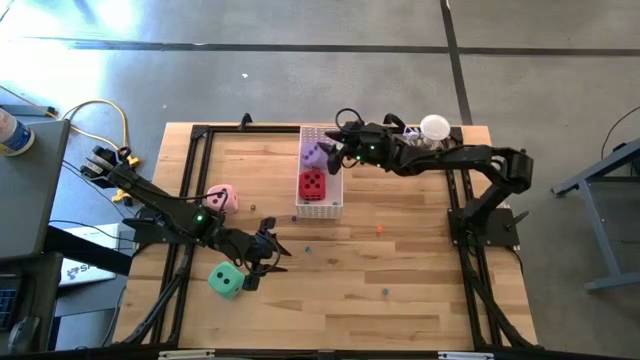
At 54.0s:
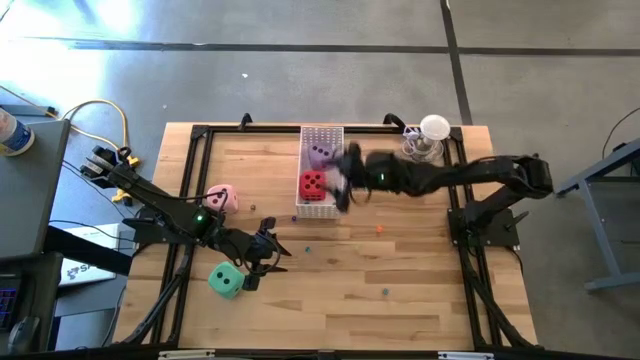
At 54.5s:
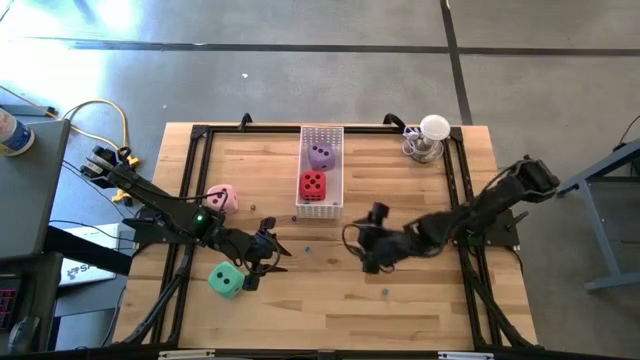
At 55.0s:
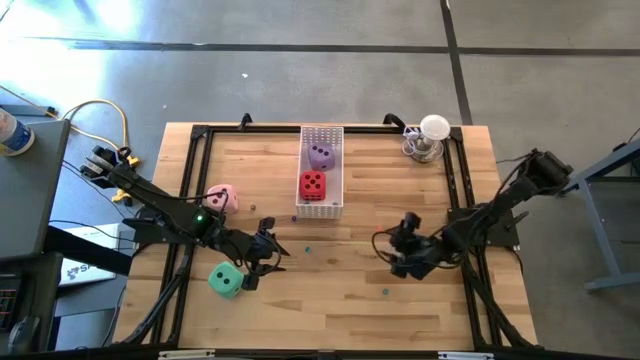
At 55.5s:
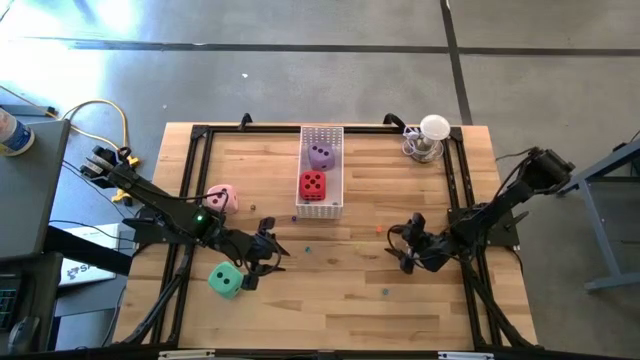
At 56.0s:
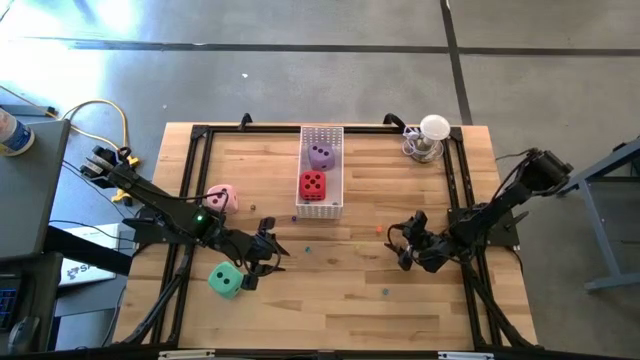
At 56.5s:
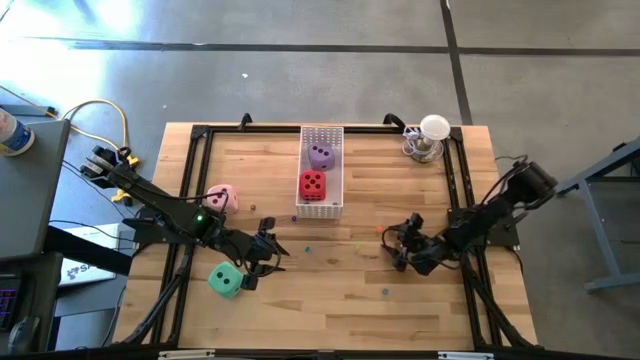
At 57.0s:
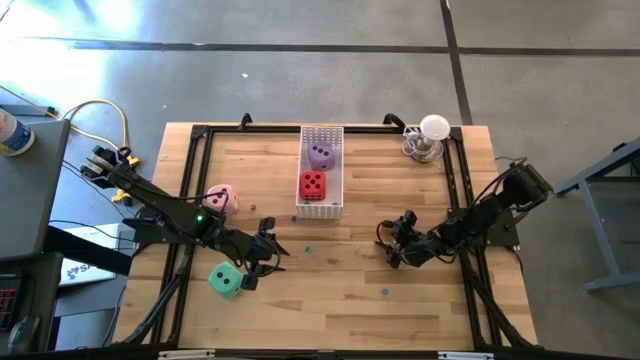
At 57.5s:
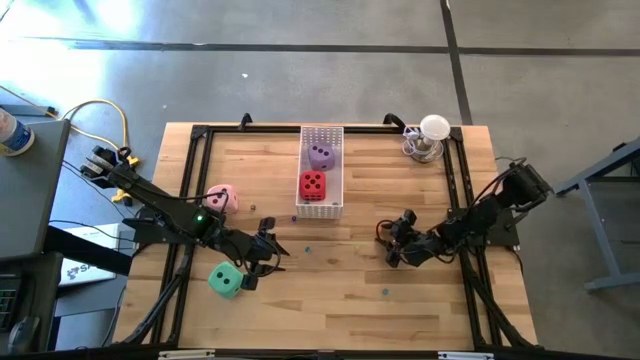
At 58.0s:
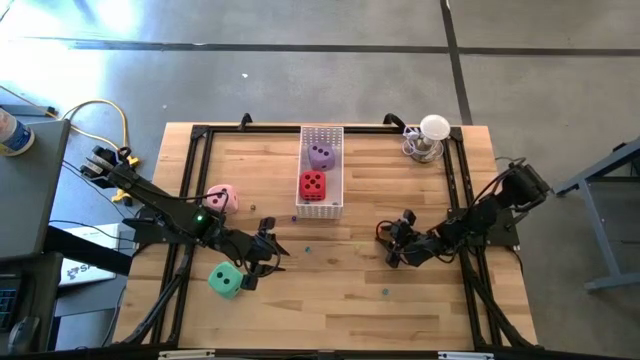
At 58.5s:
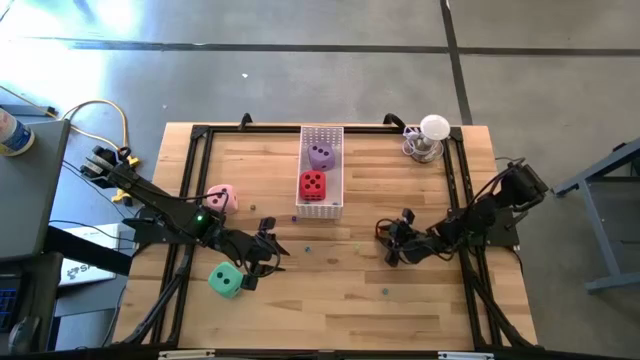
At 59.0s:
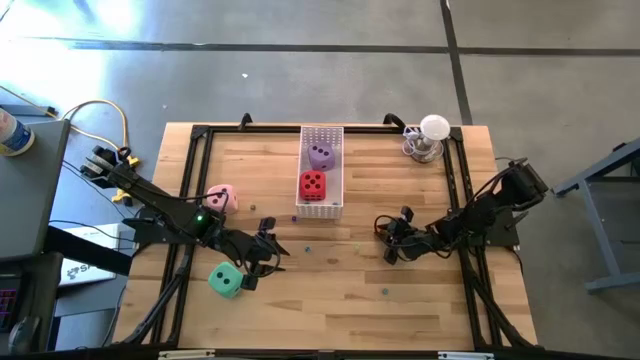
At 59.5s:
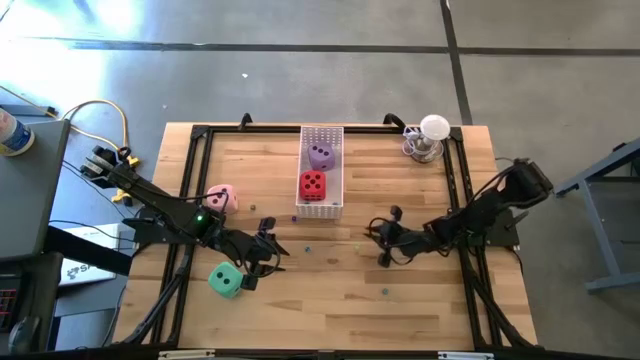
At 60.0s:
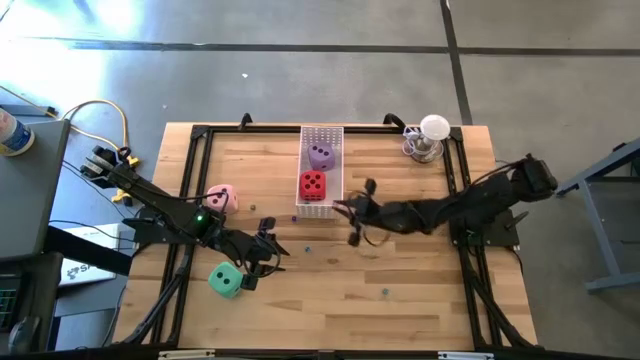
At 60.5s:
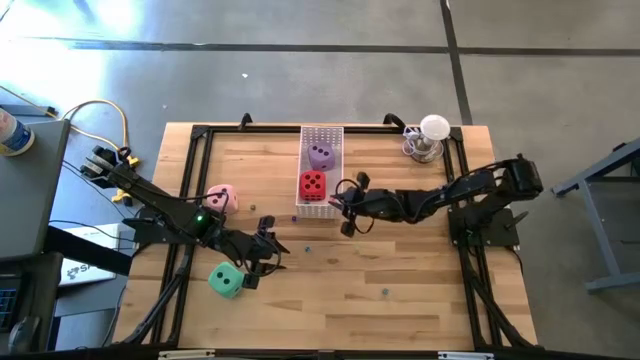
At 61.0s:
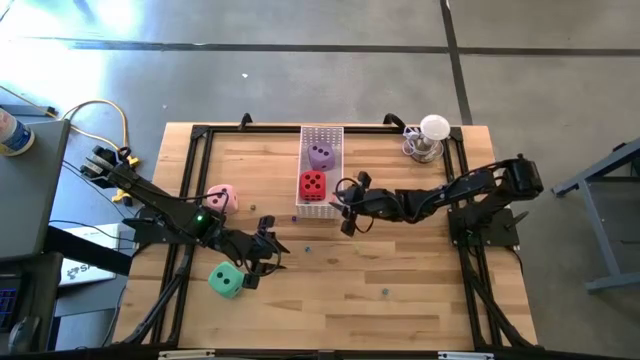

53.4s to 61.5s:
Task: Pick & Place Dice
Put the small orange die into the bin

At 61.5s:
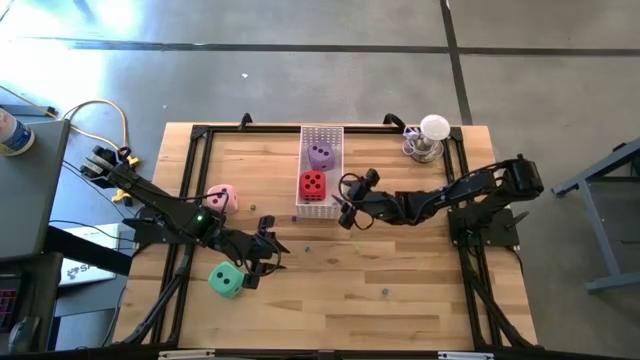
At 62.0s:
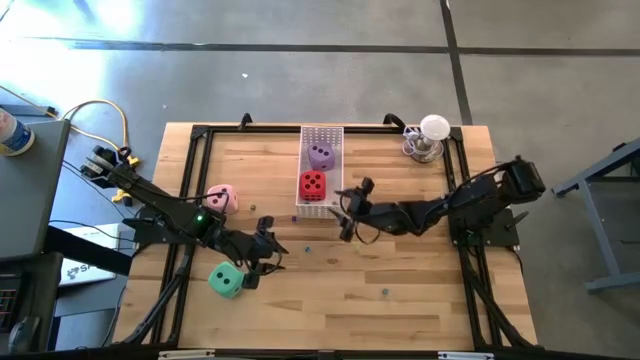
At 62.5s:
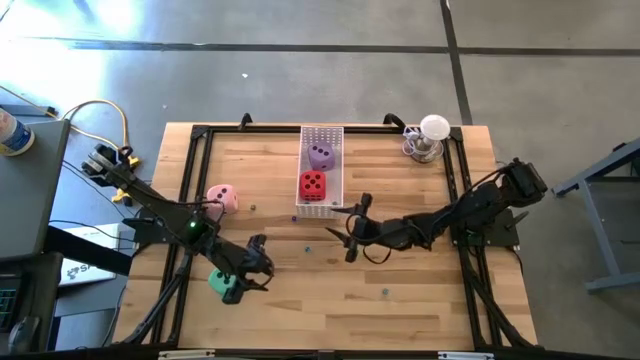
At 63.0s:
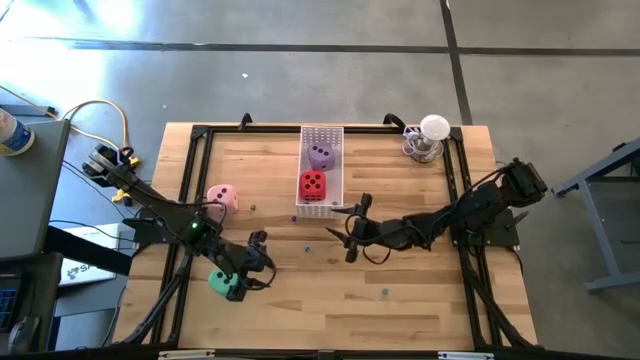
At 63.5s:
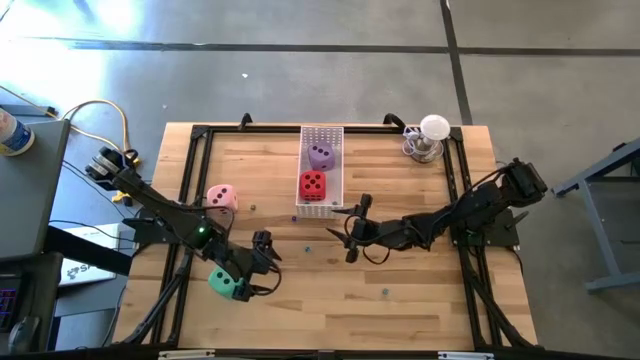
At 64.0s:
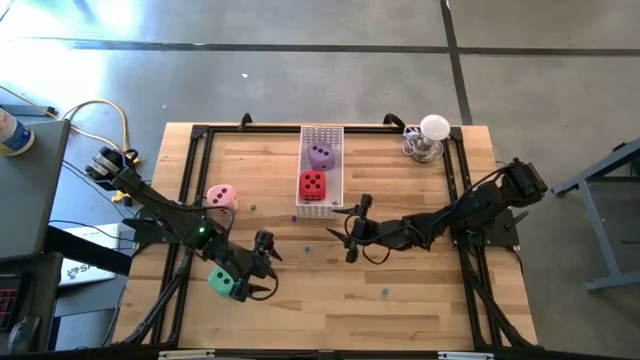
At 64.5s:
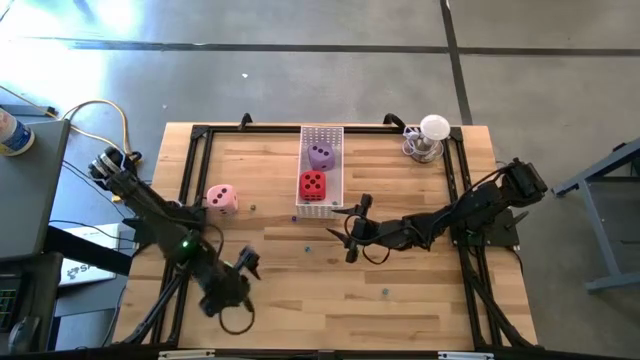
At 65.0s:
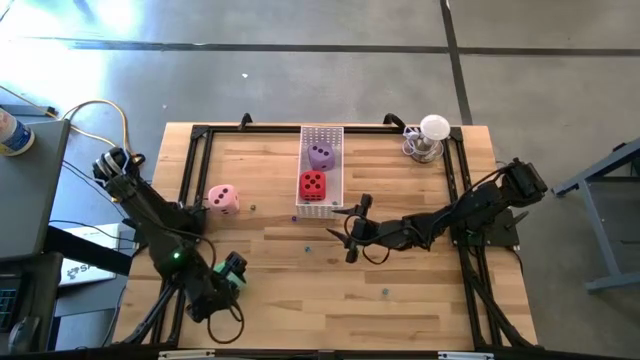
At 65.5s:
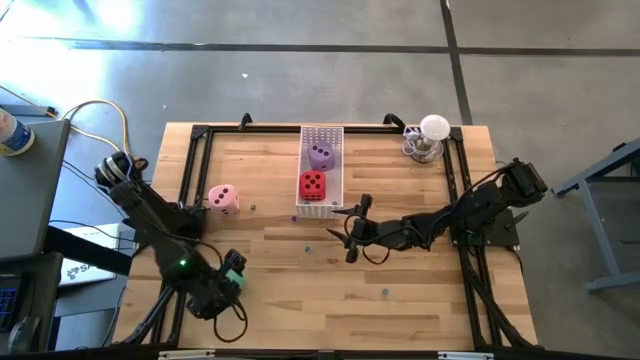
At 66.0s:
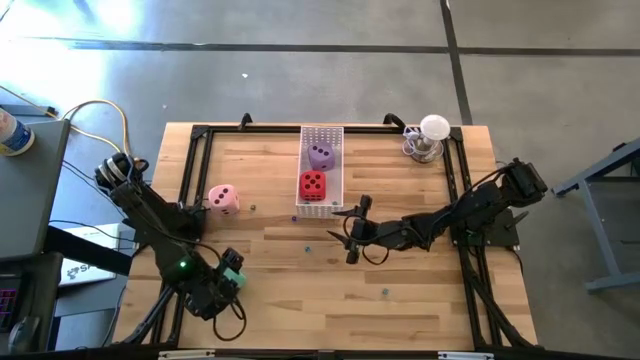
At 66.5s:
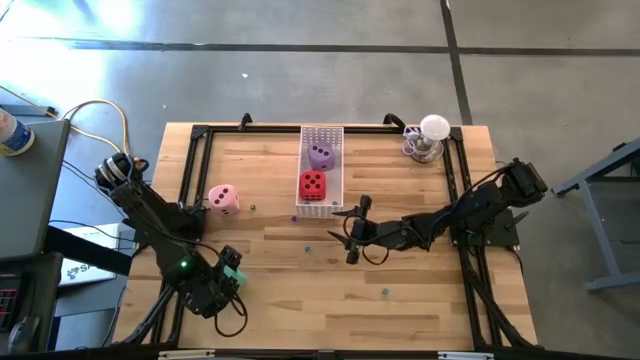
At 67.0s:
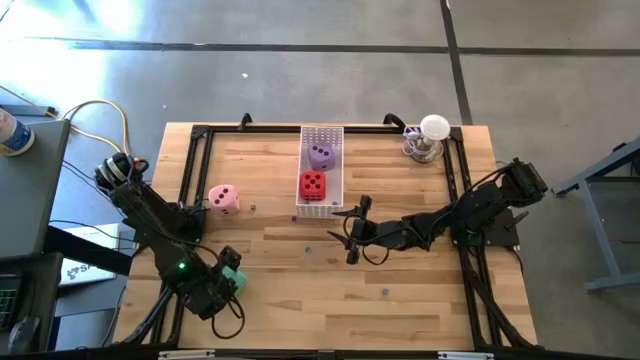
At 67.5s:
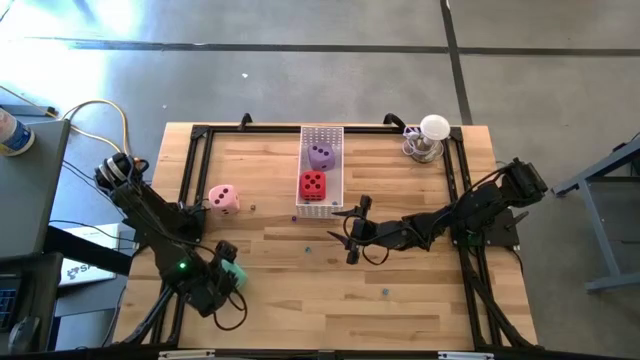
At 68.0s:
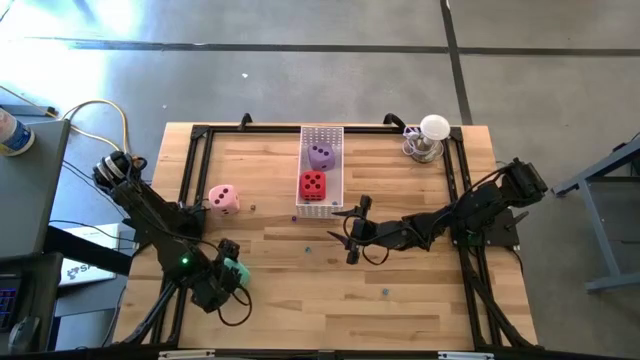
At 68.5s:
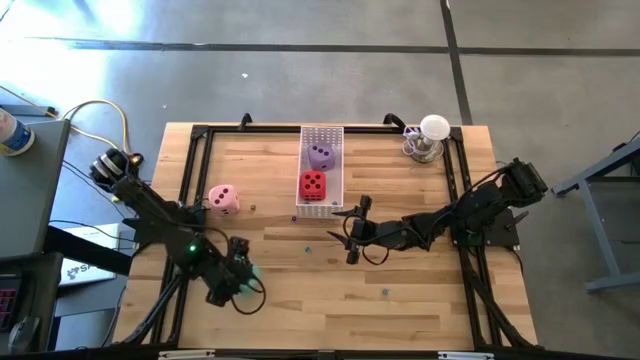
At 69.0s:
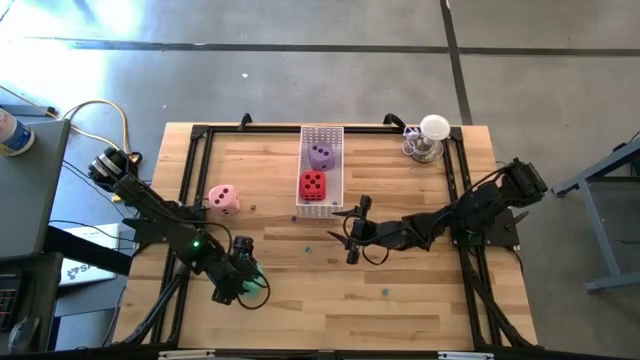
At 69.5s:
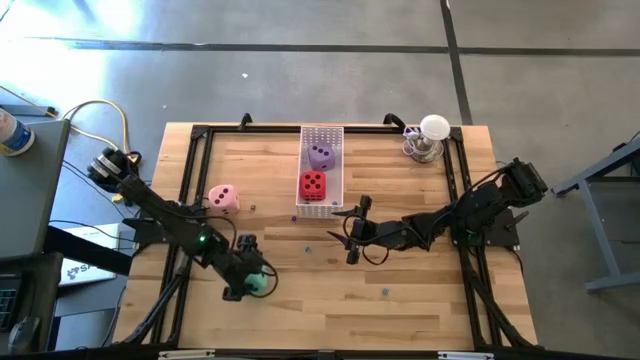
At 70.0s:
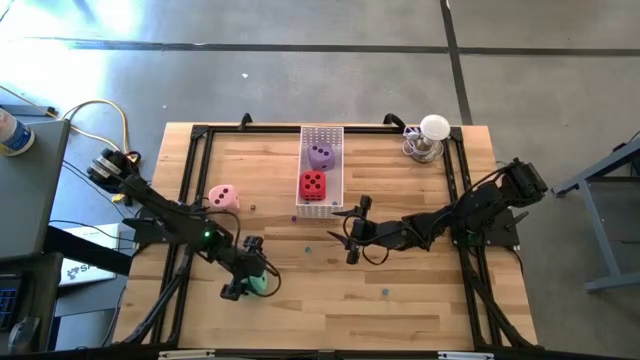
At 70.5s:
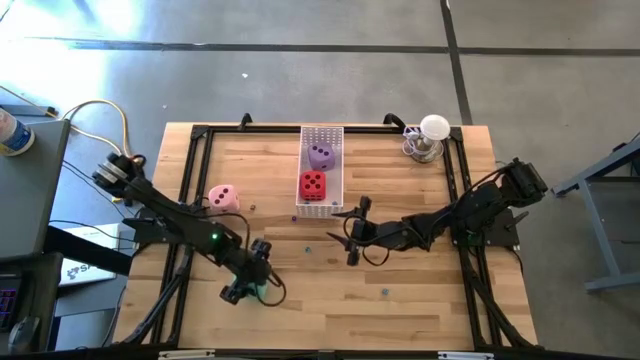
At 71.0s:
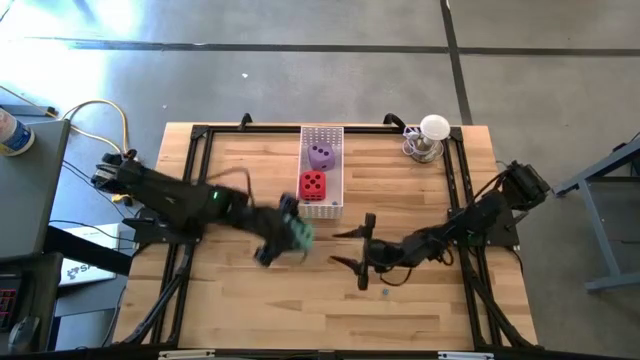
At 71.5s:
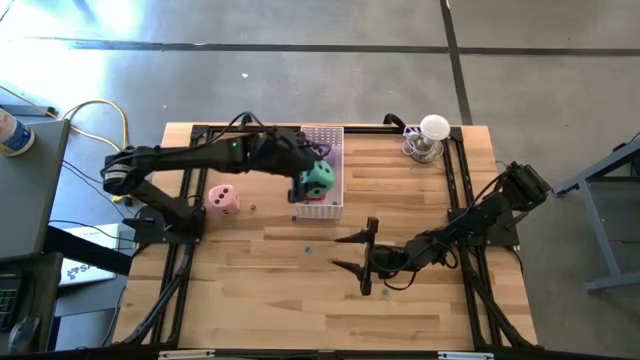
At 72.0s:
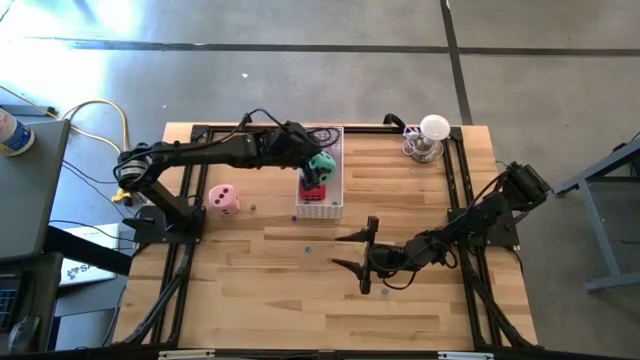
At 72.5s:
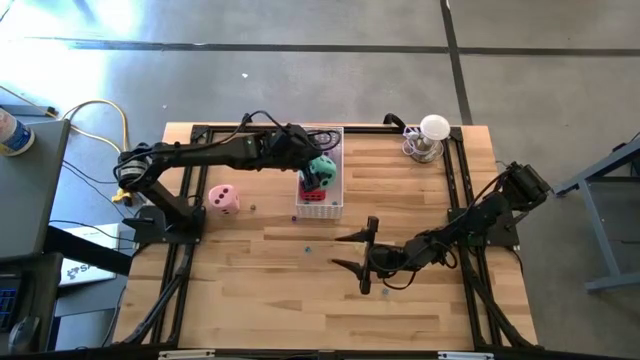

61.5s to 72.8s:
Put the large green die into the bin

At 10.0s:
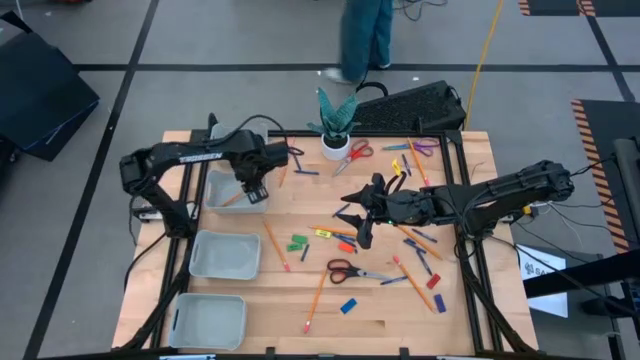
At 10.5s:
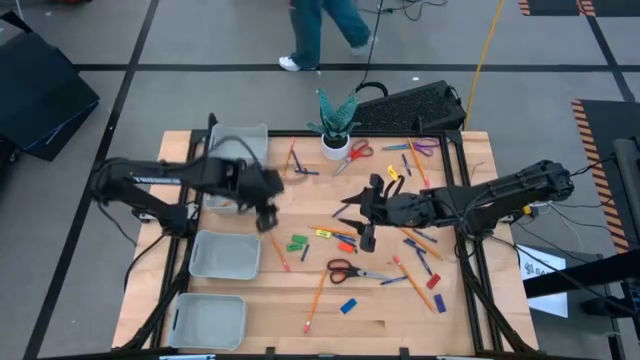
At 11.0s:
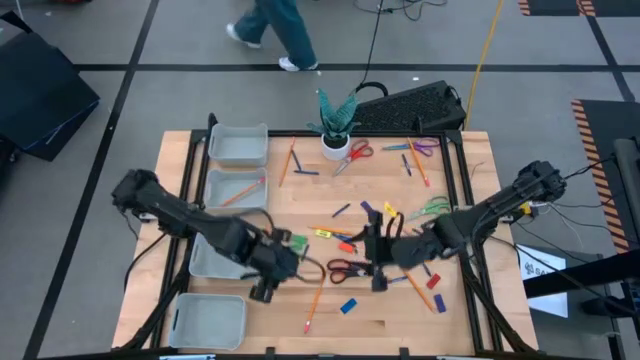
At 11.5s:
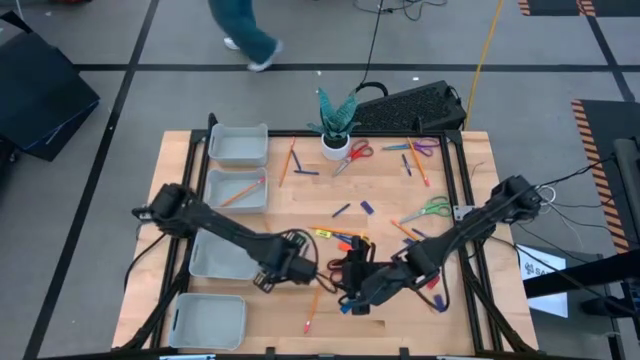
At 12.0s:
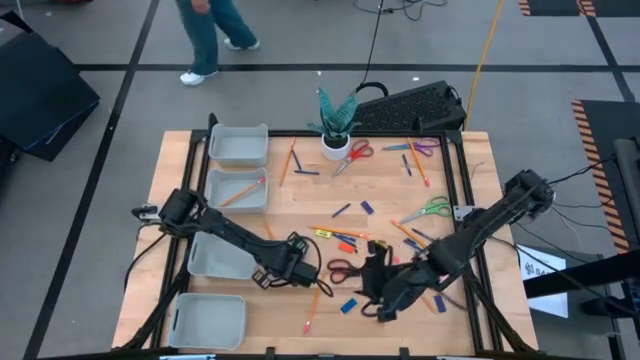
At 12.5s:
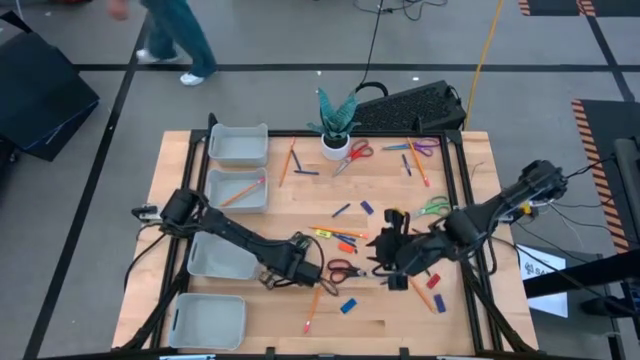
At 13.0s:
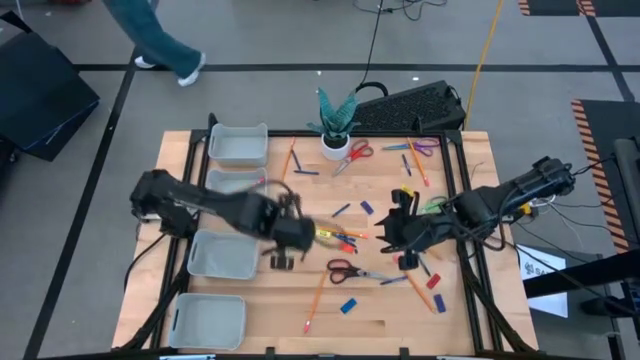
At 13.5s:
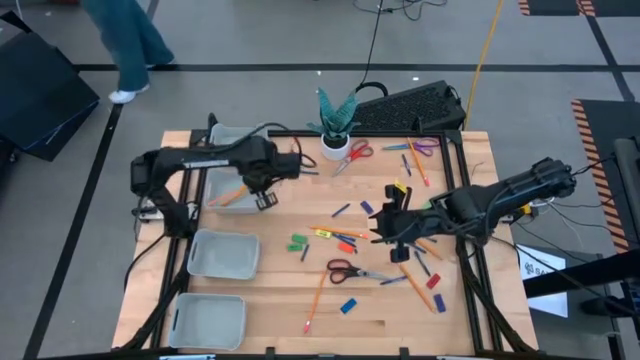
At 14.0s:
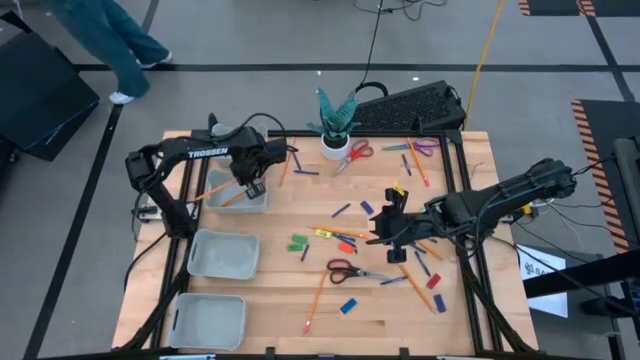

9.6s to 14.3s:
Task: Sort crayons/erasers/pens/pencils in bins
Put the orange pencil into the middle top gray bin
